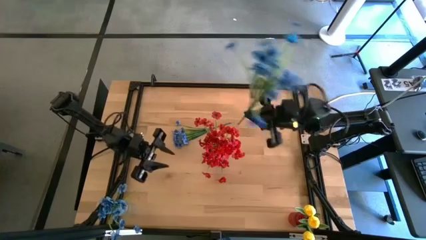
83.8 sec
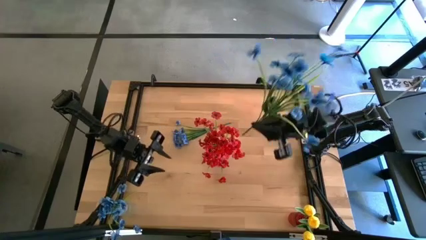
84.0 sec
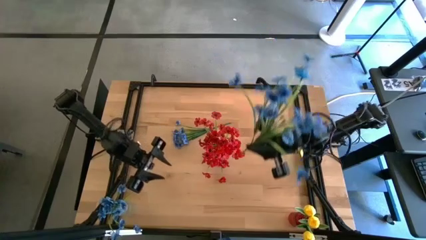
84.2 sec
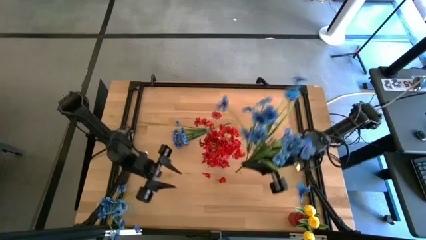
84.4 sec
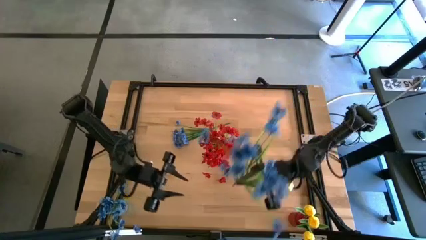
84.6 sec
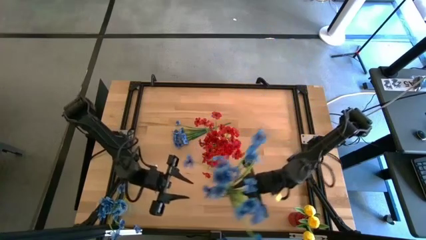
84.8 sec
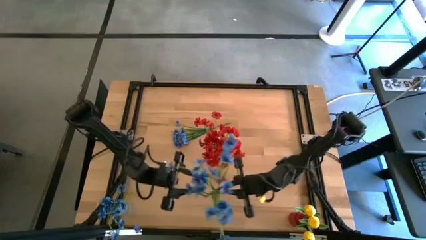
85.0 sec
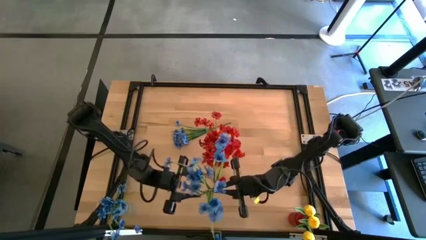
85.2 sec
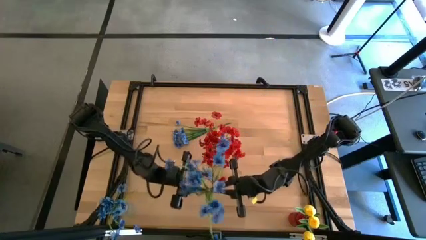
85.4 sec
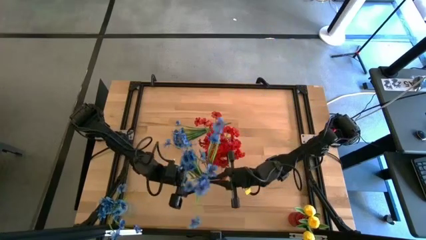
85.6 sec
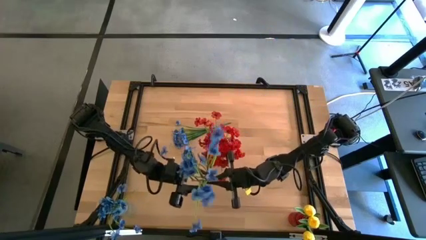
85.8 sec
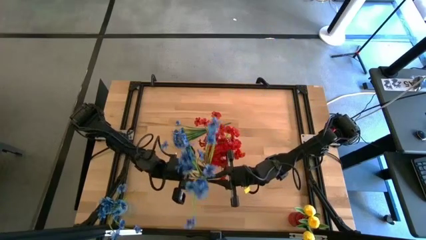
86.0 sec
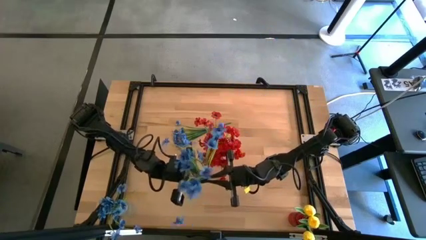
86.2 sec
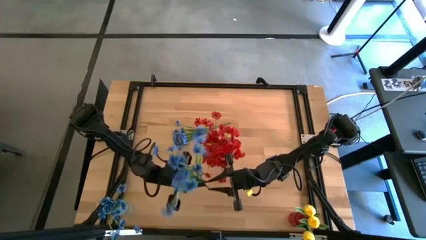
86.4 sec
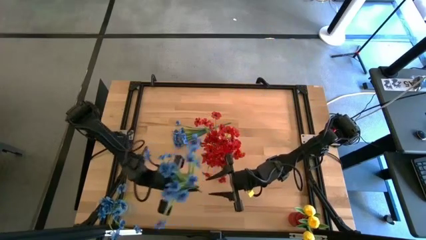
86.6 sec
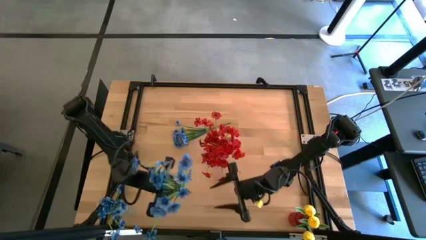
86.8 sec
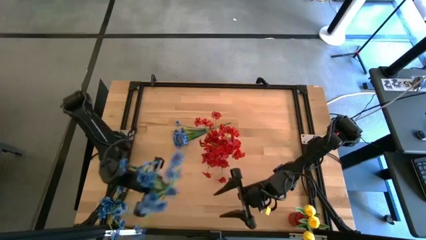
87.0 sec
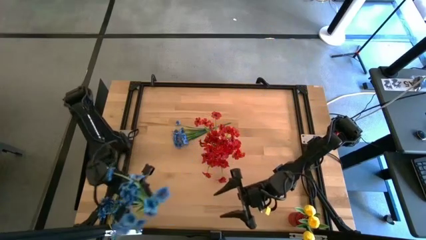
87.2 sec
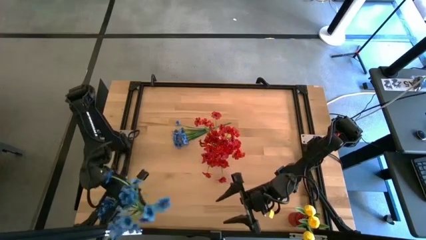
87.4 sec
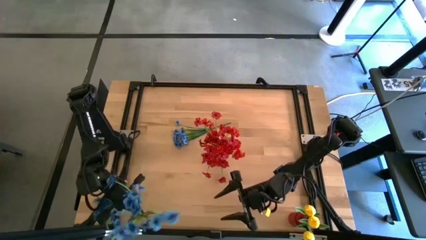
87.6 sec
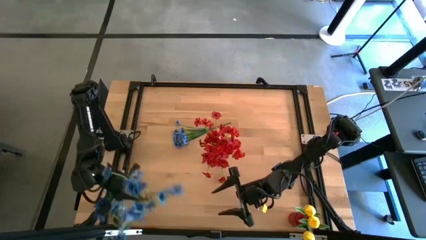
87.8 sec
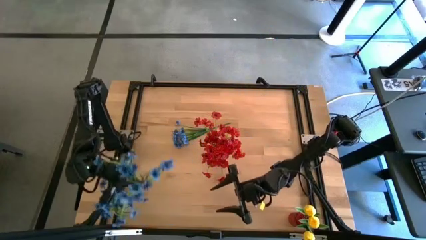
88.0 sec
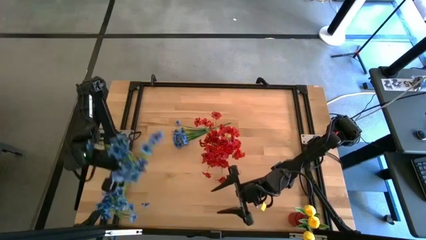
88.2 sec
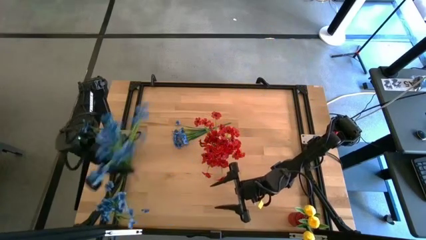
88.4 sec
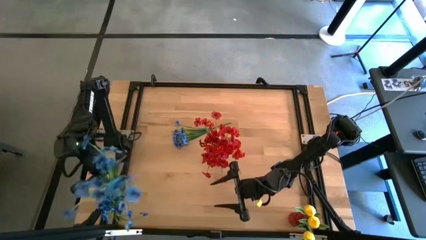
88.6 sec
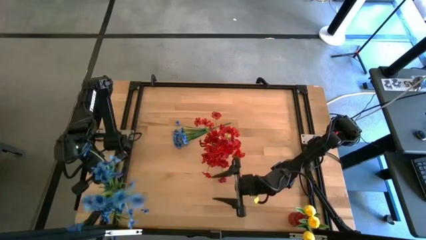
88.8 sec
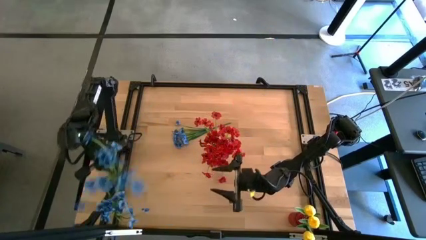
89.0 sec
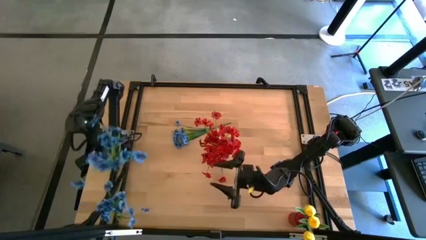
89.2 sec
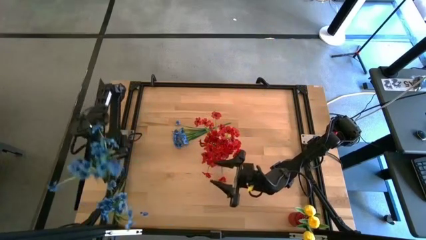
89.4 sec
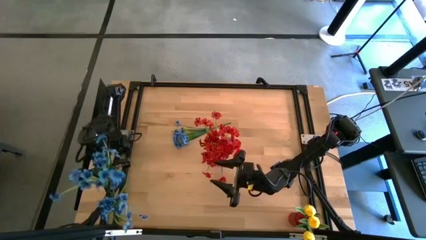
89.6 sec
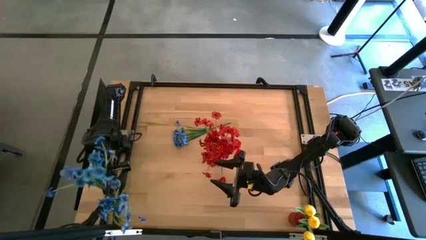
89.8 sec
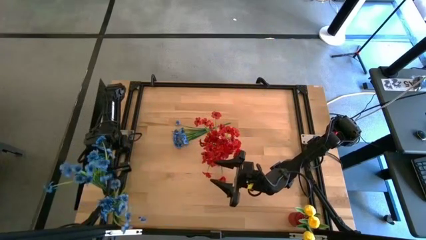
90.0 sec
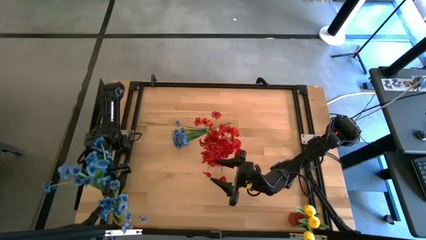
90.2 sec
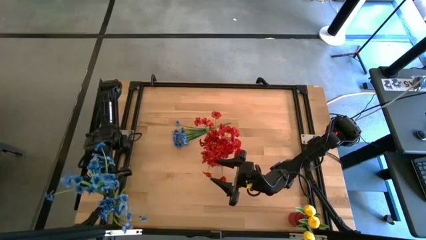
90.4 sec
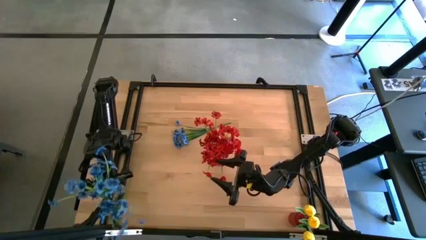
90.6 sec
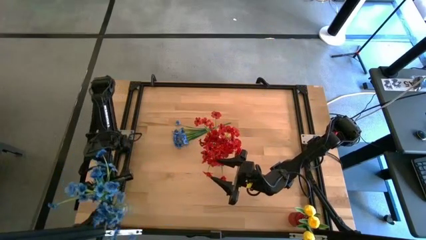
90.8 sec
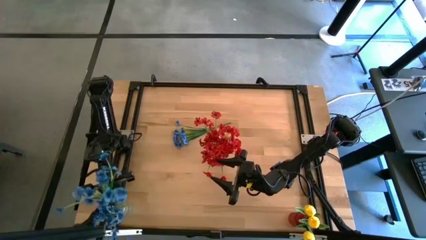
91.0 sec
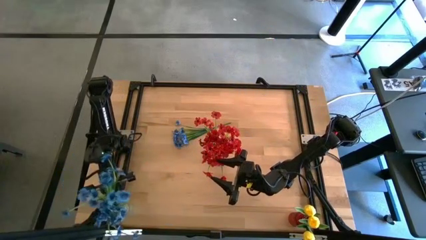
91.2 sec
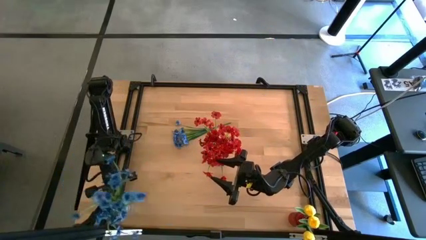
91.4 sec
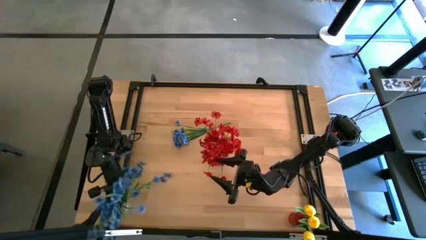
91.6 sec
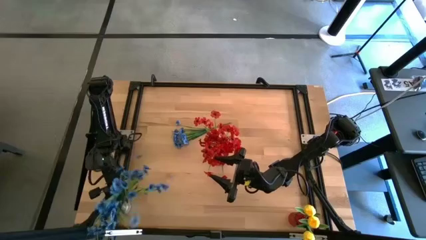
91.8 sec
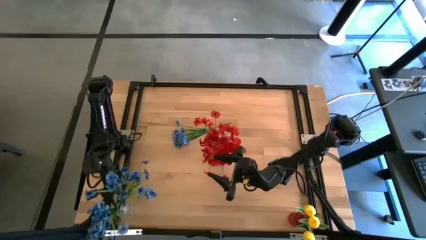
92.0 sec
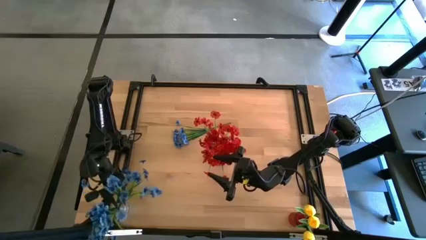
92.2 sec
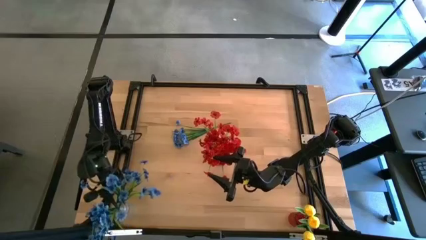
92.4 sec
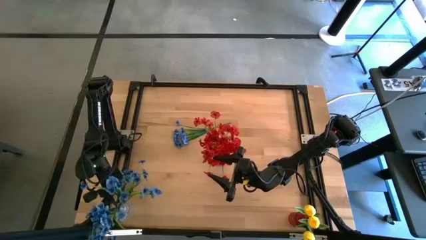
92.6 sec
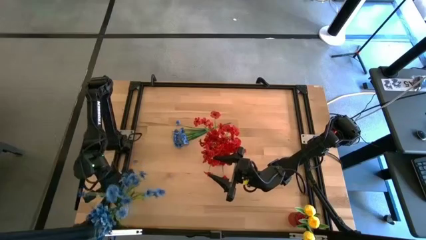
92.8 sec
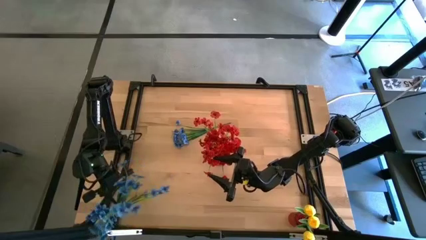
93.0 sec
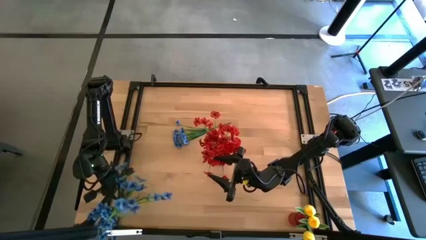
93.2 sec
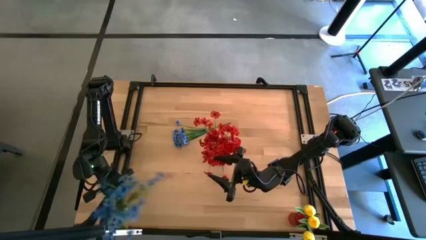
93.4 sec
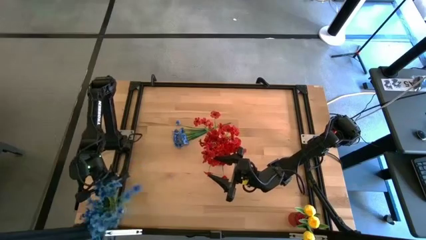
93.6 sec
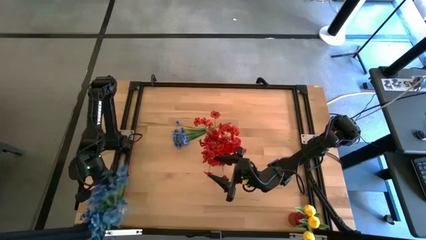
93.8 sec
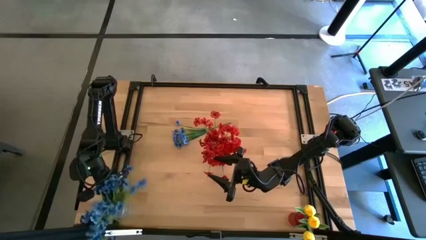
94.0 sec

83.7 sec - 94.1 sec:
Task: Sort flowers into vase by color
Put the bottom blue flowers into the transparent vase

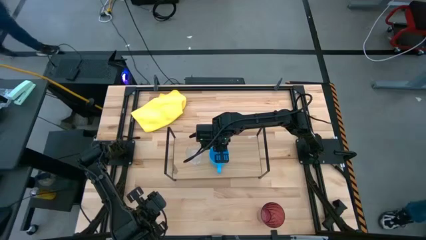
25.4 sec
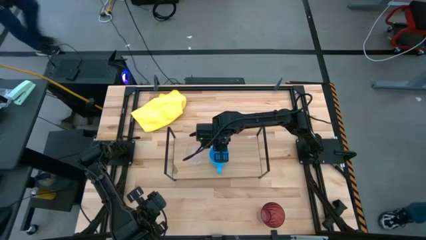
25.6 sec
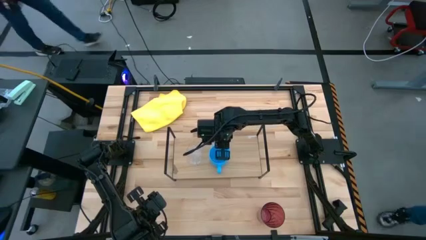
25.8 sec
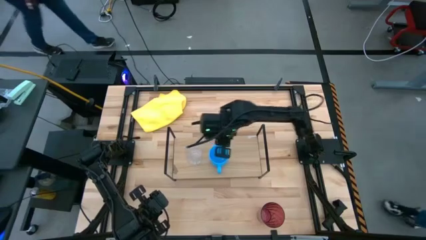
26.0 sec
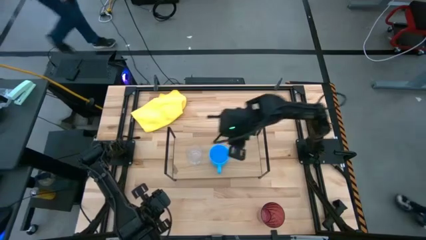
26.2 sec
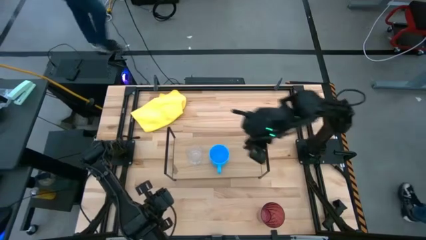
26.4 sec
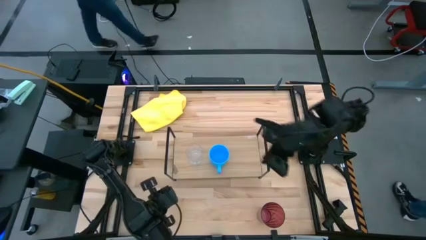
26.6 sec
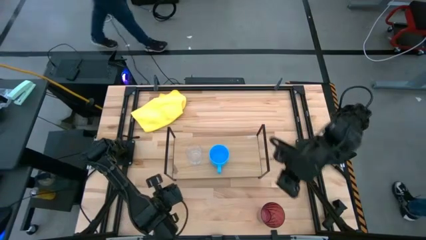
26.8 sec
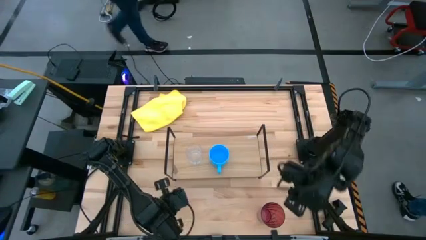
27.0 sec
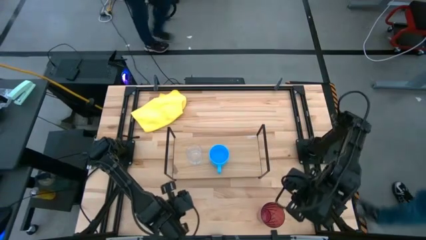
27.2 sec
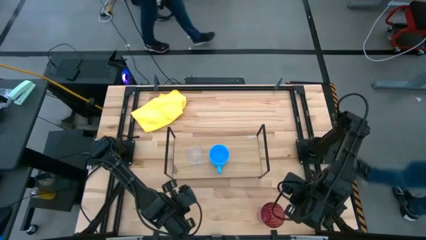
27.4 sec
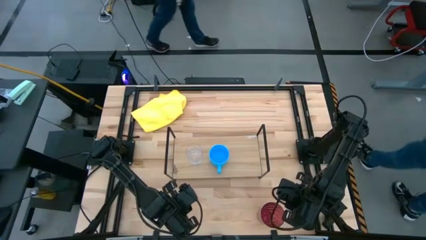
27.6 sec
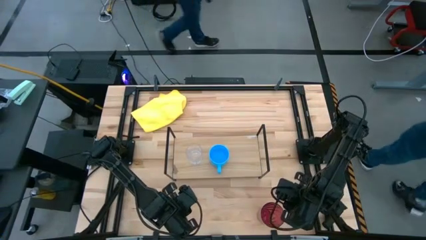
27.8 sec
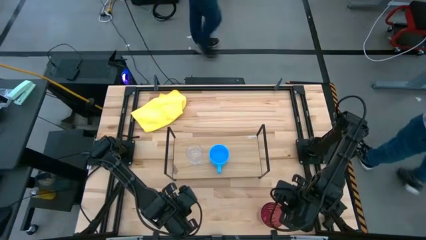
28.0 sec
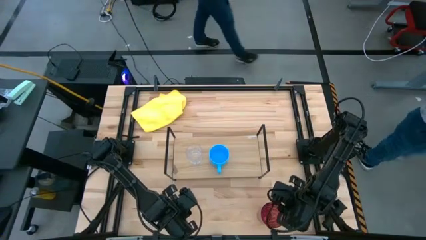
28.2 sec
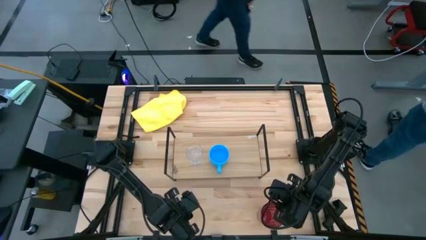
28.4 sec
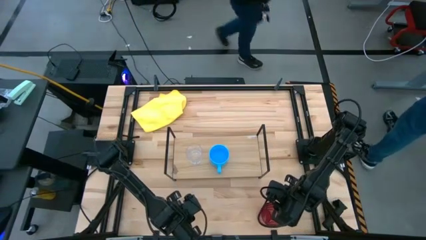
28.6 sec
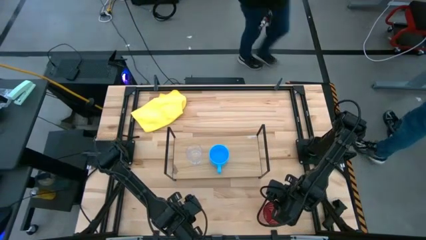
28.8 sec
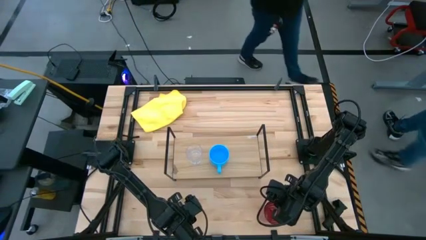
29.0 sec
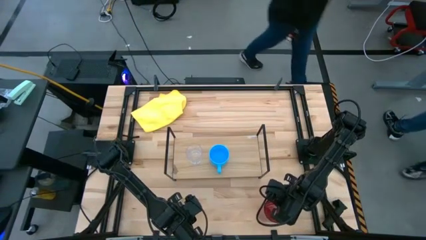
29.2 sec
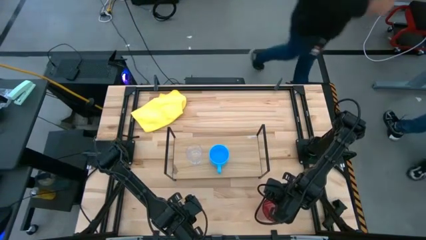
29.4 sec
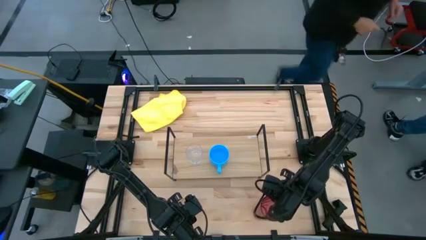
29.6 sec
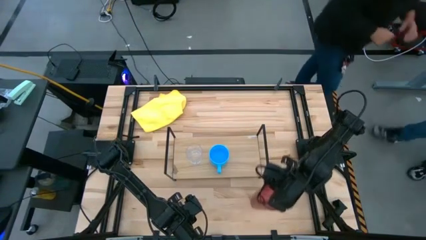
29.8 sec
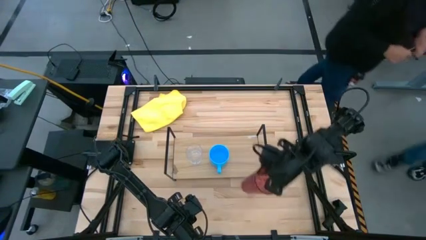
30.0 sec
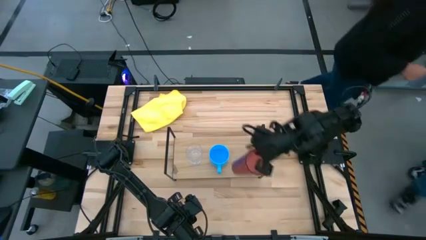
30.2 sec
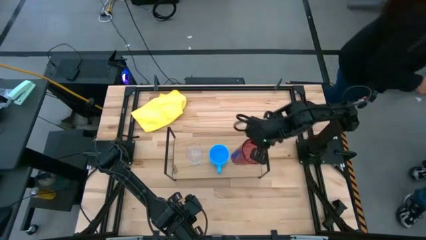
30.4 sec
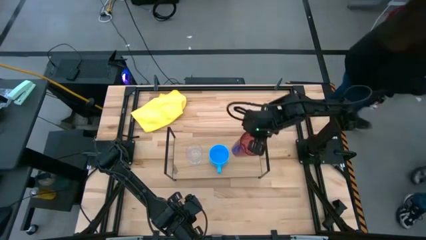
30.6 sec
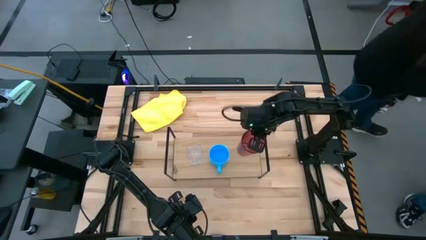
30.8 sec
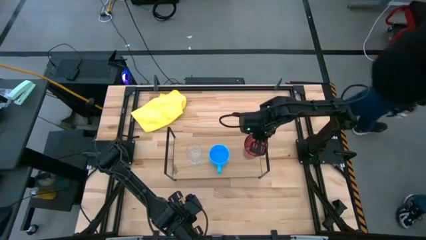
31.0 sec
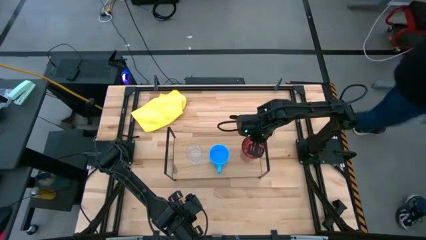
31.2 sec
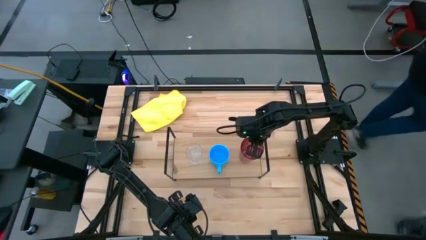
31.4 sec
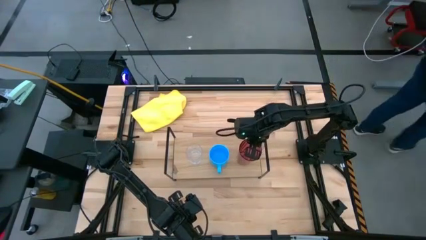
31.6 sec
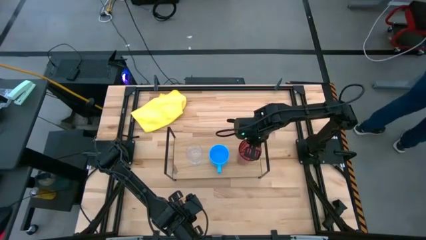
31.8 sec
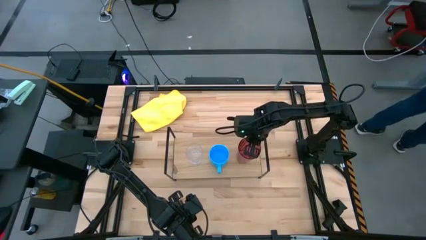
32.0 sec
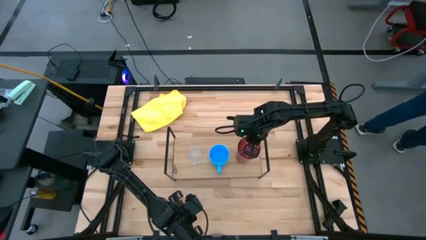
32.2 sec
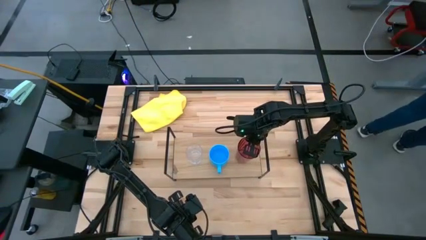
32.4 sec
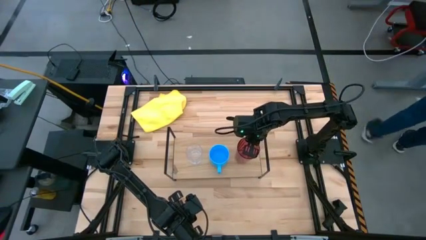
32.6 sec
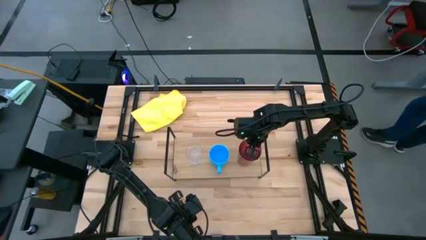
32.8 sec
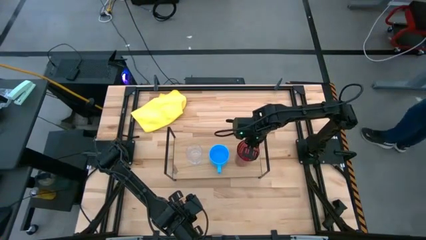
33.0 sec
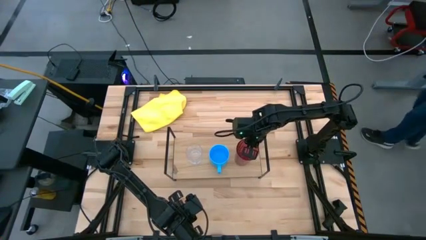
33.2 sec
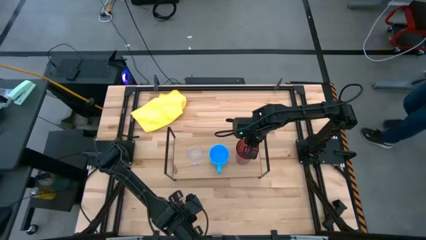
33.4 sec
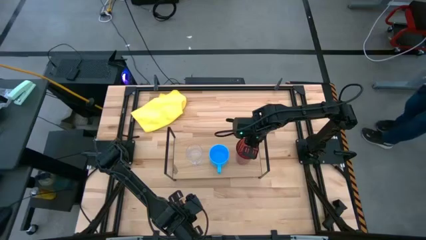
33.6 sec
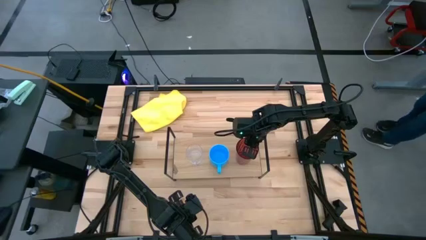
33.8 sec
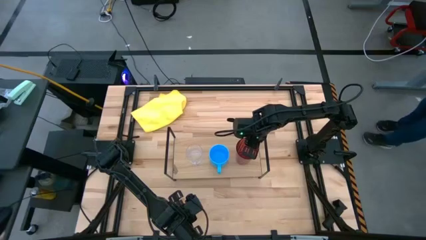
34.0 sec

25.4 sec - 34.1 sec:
Task: Stack small to large cups/mugs on shelf
Put the red cup on the shelf
